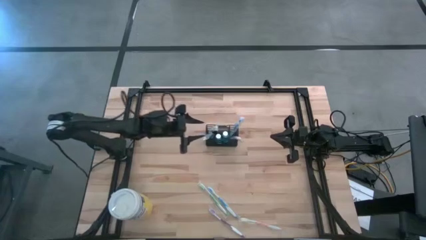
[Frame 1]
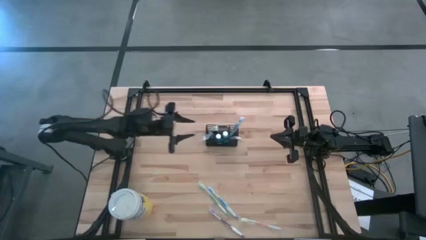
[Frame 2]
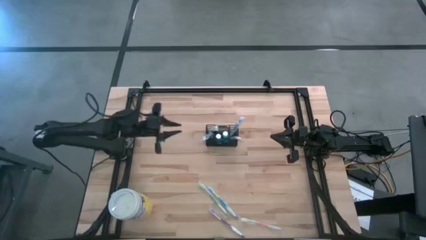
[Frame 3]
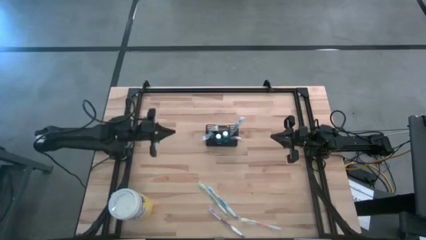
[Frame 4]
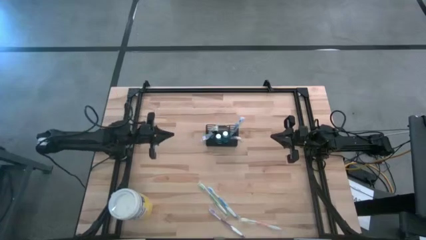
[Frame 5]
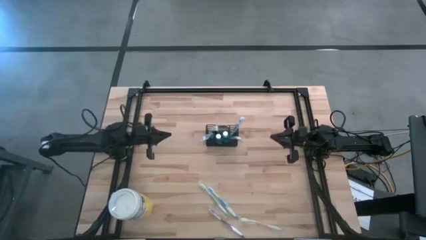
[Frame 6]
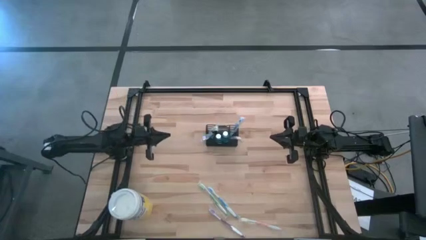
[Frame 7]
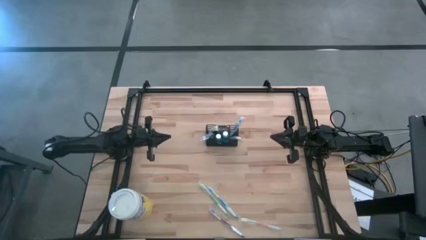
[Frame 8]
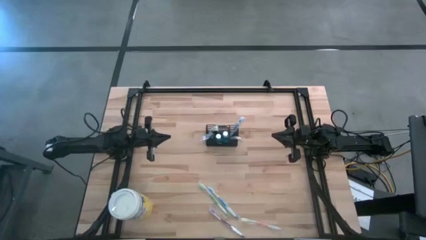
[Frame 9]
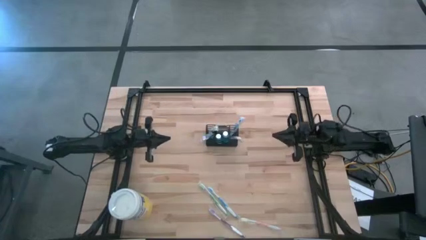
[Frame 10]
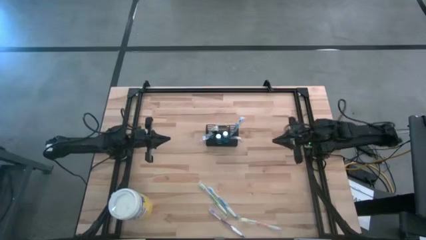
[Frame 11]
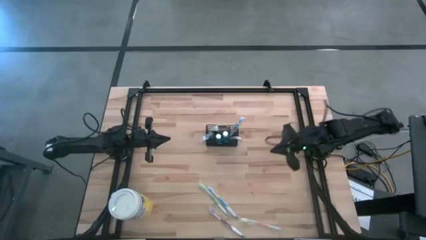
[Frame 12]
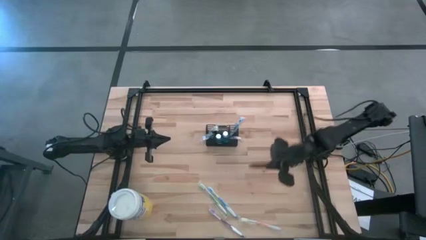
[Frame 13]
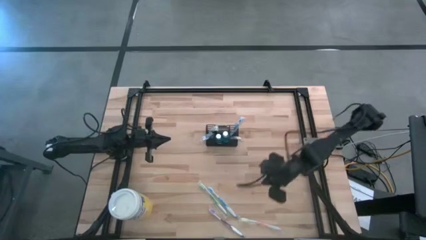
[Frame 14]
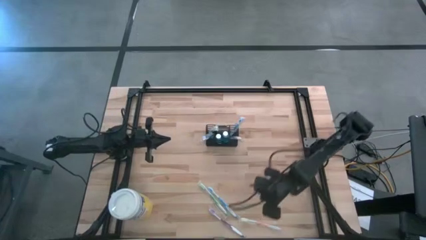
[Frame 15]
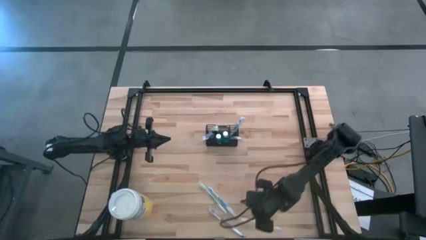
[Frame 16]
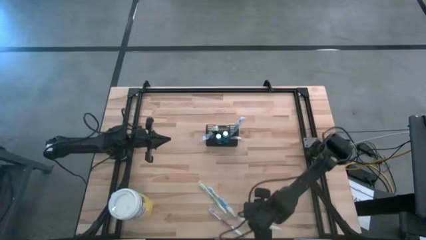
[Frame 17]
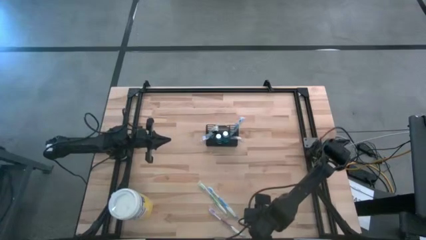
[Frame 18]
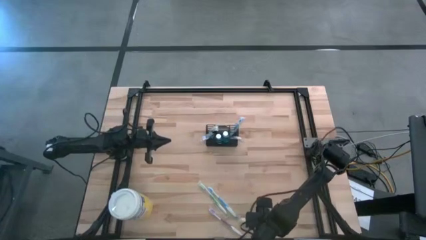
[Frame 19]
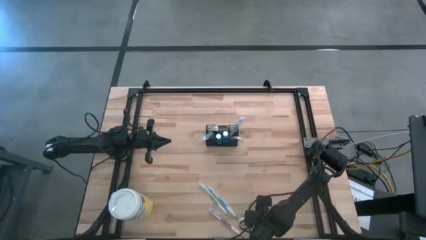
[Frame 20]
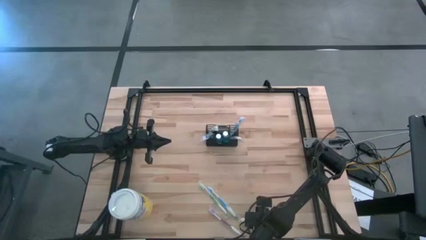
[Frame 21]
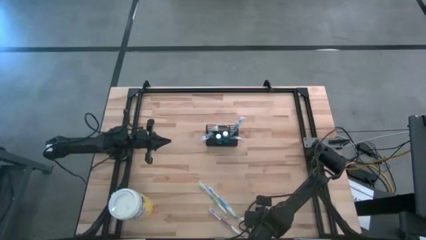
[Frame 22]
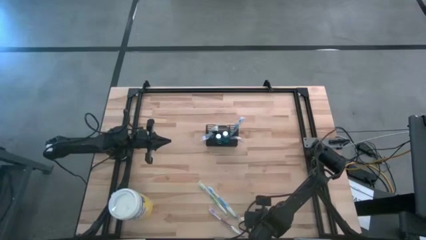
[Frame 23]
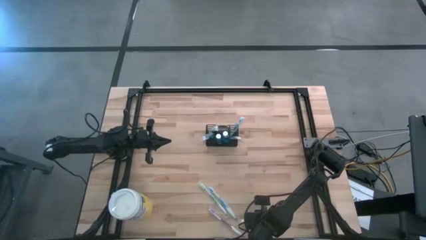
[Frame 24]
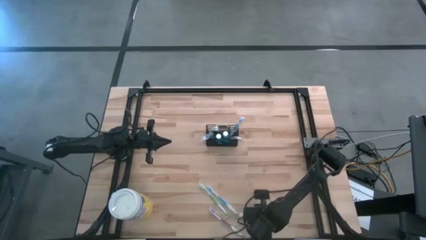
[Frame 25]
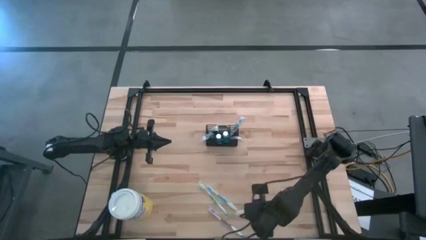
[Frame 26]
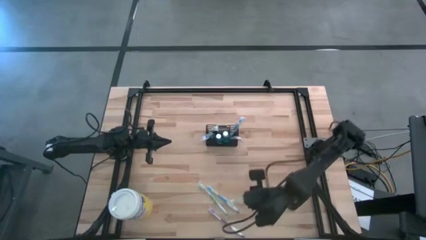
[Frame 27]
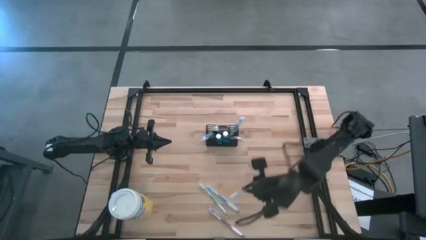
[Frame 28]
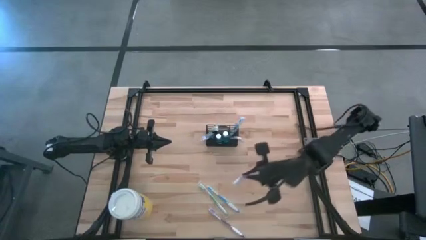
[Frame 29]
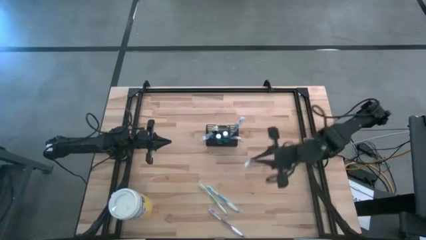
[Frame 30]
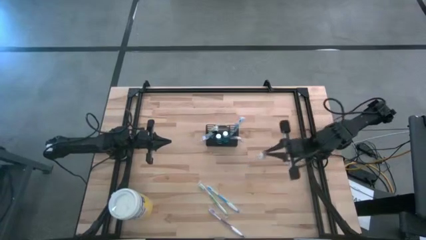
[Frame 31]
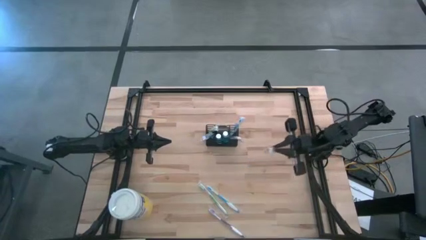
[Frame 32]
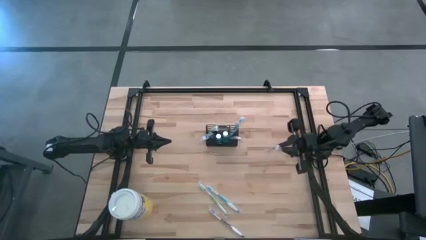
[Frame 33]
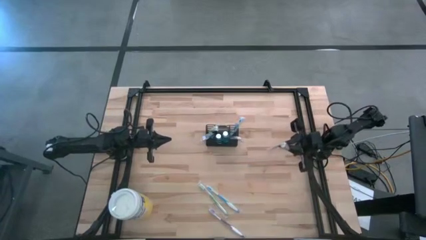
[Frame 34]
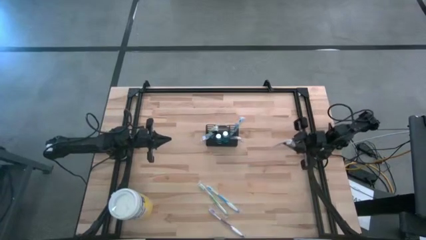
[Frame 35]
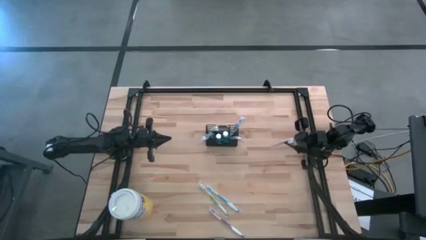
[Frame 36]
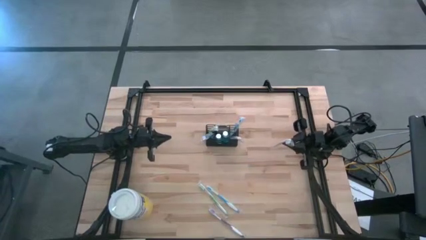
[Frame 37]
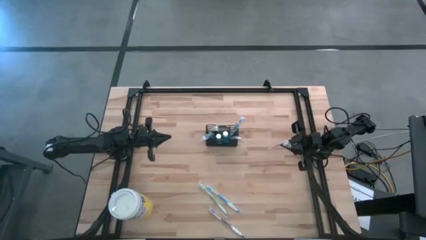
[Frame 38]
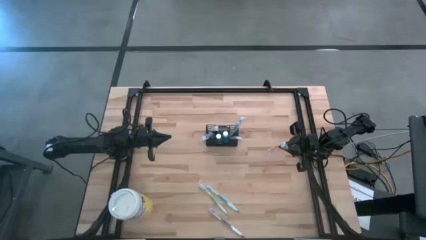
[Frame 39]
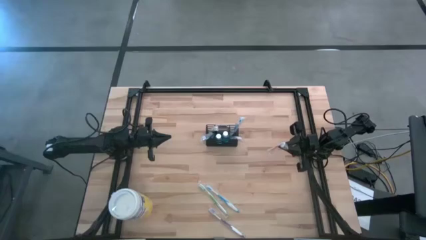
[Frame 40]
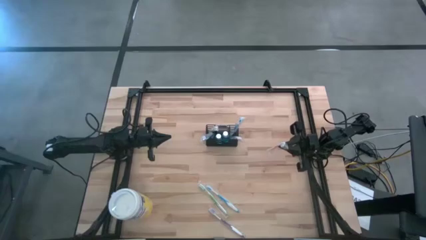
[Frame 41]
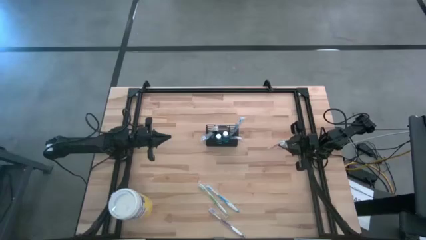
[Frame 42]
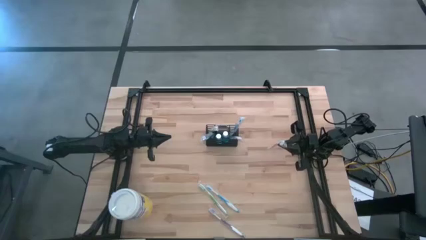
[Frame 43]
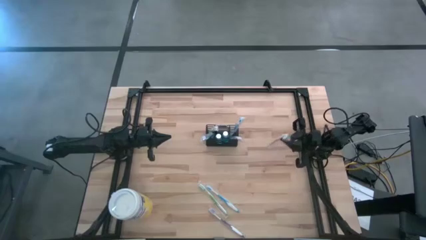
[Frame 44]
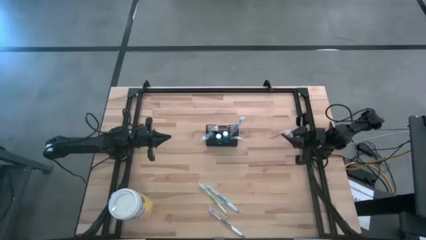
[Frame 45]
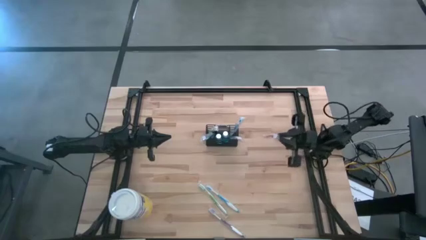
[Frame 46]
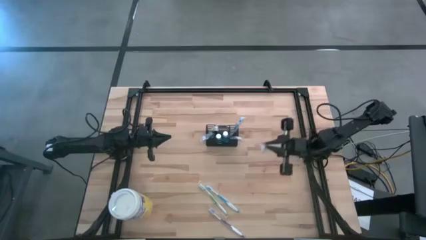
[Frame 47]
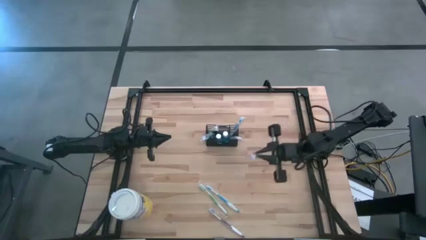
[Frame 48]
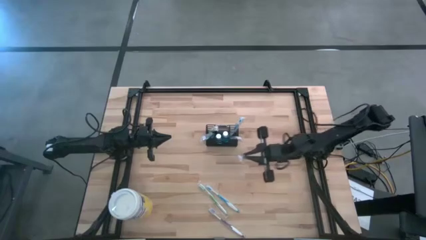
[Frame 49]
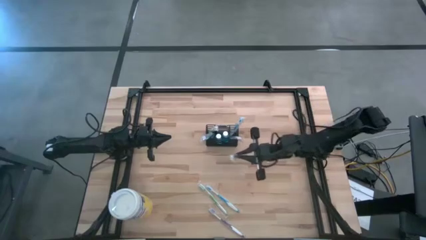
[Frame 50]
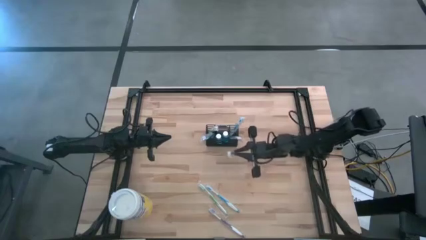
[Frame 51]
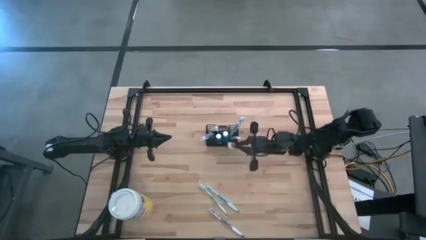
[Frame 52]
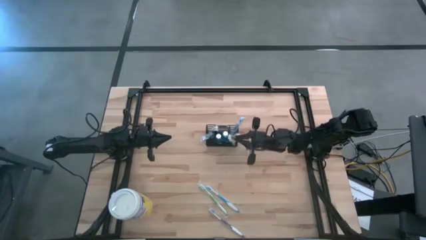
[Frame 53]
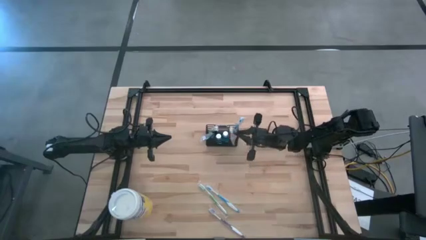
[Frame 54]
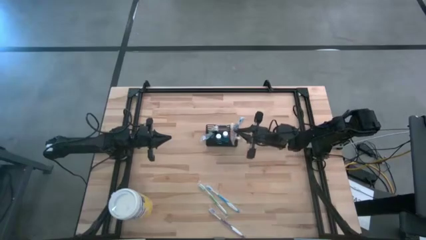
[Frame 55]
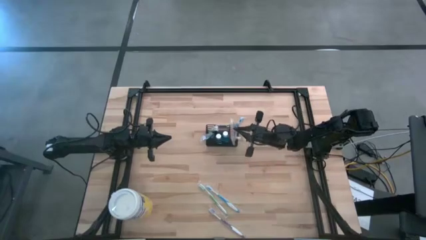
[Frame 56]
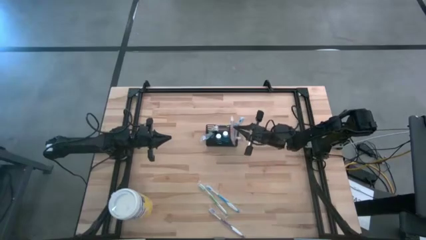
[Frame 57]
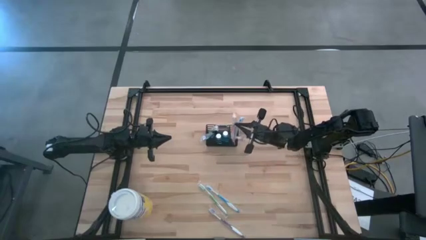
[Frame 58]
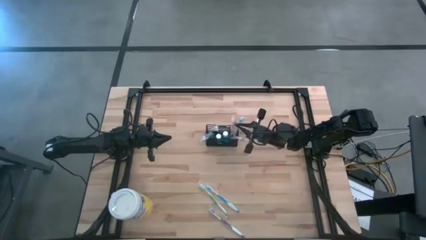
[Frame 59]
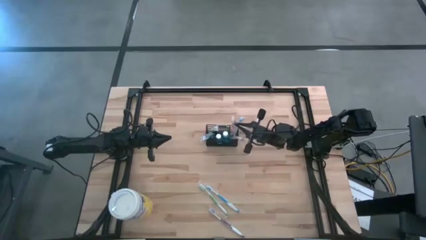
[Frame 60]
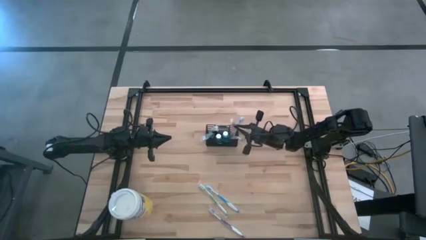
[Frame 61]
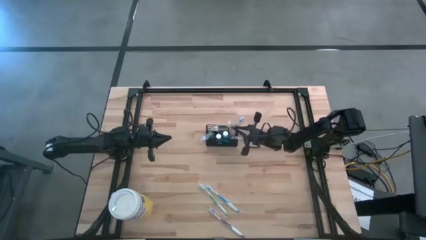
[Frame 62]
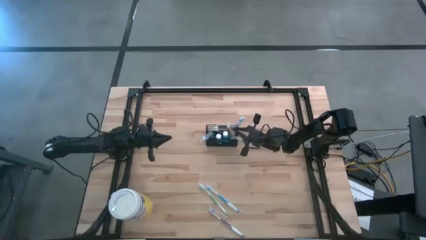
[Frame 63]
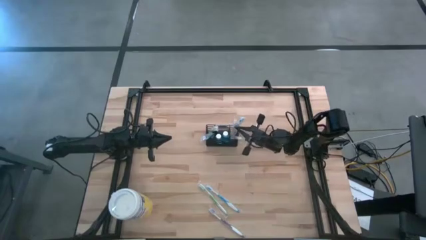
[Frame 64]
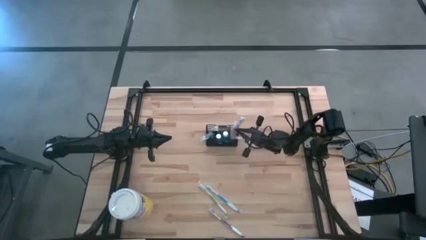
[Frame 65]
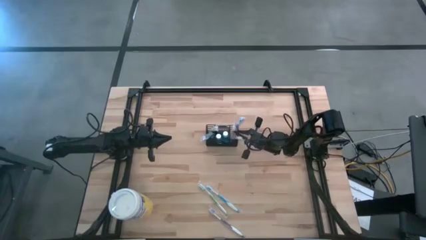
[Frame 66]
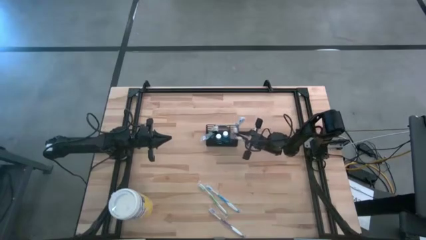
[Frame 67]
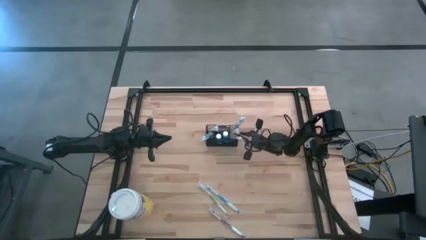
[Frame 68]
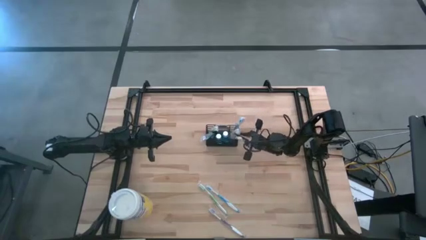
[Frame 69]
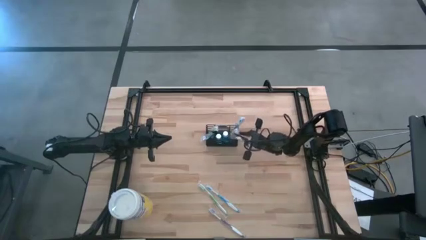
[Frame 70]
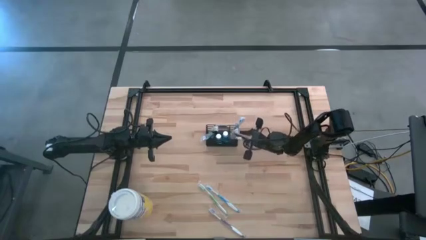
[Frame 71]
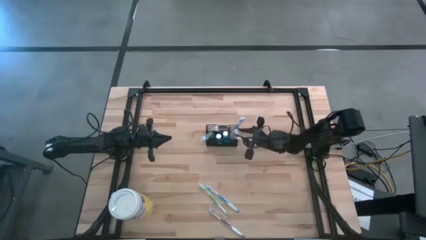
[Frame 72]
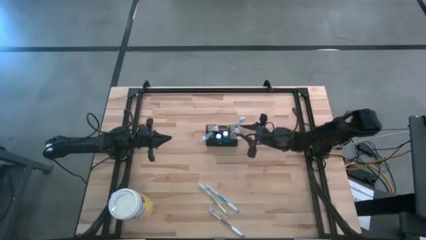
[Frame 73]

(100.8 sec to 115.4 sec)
Task: Pick & Place toothbrushing station
Put the orange toothbrush into the wire organizer

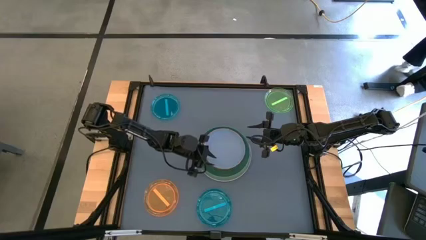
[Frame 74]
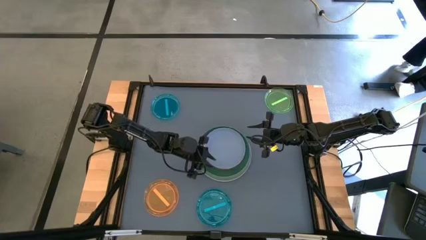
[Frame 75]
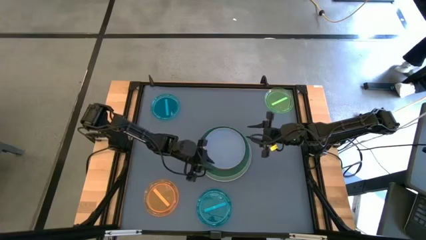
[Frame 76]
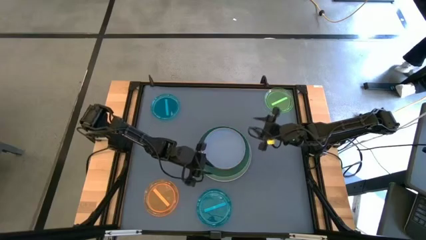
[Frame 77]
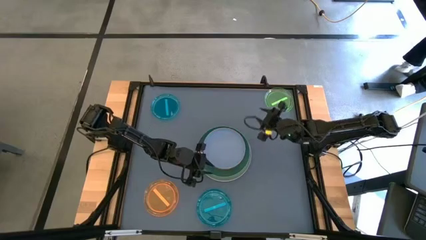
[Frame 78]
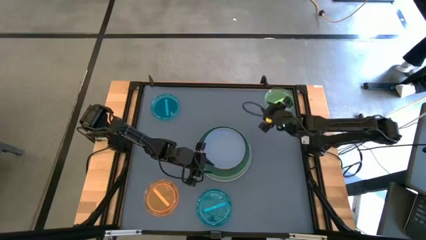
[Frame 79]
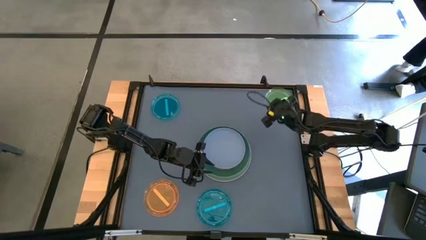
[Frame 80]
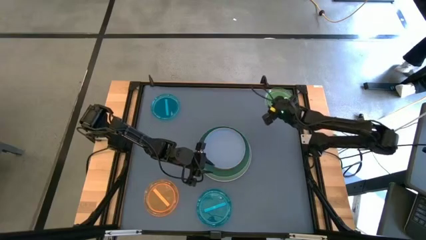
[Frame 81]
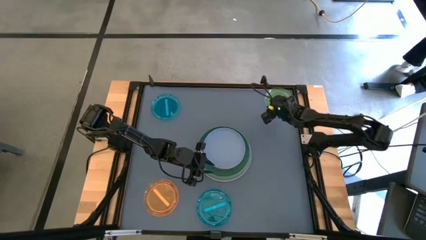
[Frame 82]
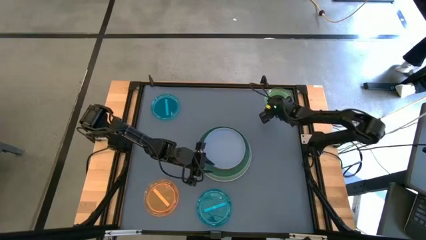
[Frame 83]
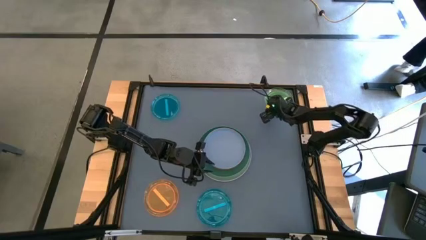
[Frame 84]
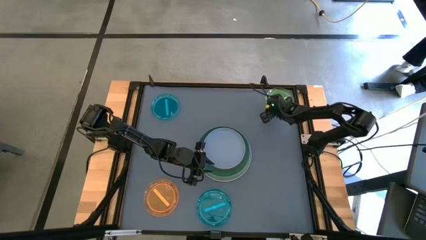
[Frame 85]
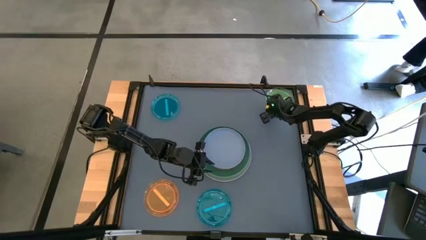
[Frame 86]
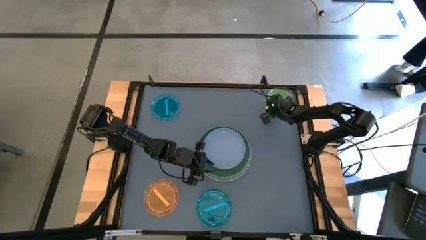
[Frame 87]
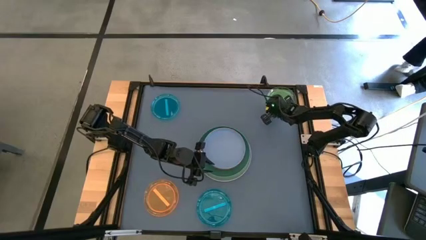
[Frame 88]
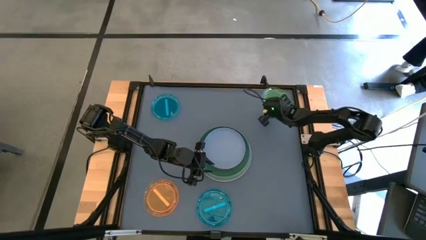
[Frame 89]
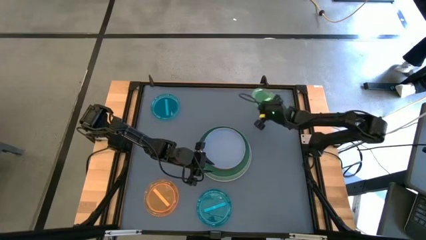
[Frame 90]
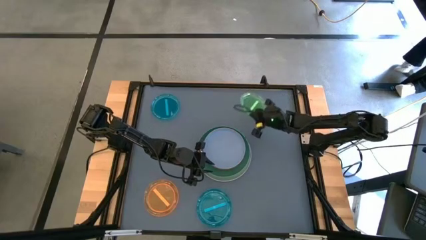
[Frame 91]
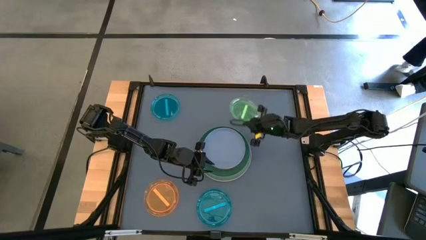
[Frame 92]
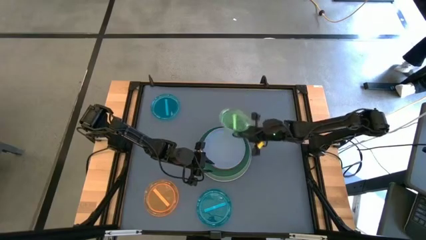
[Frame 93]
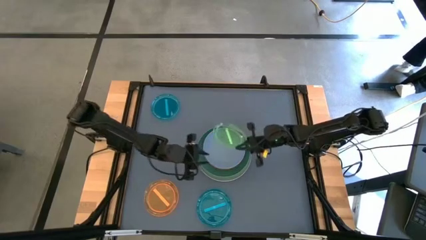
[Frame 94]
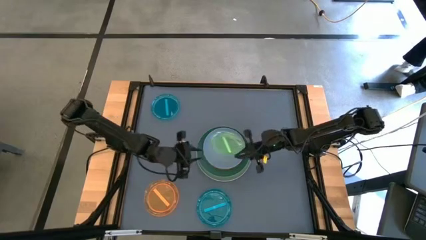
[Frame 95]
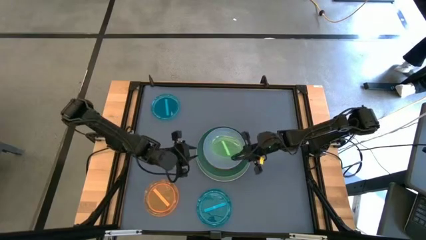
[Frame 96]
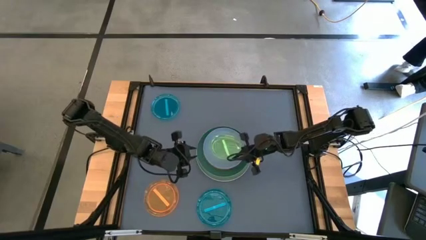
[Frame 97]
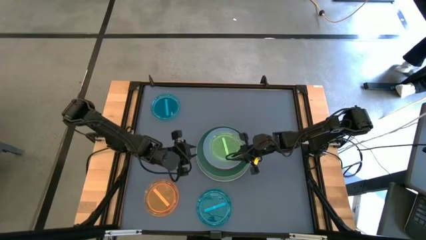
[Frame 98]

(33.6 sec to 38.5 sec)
Task: Stack plastic plates
Stack the light green plate on top of the blue plate
